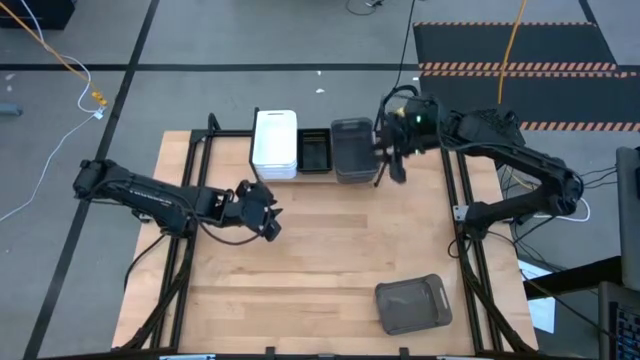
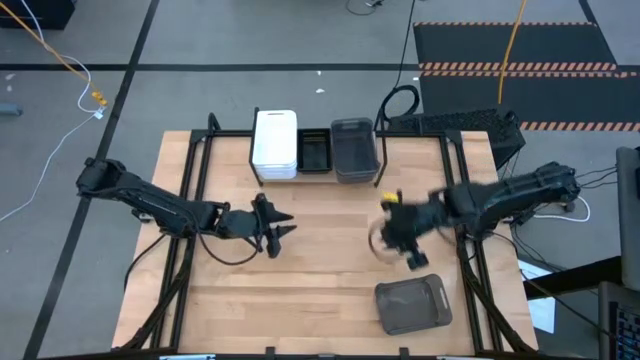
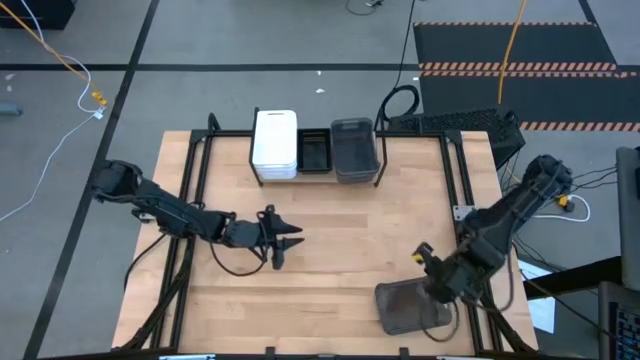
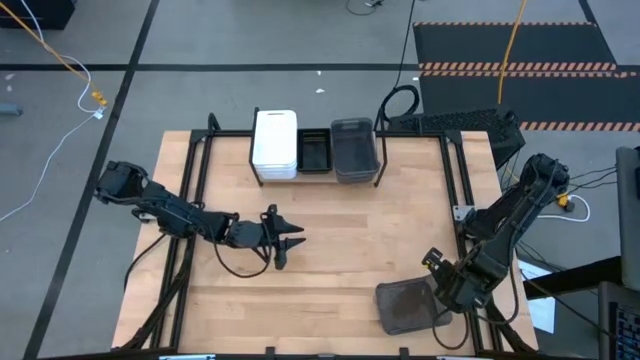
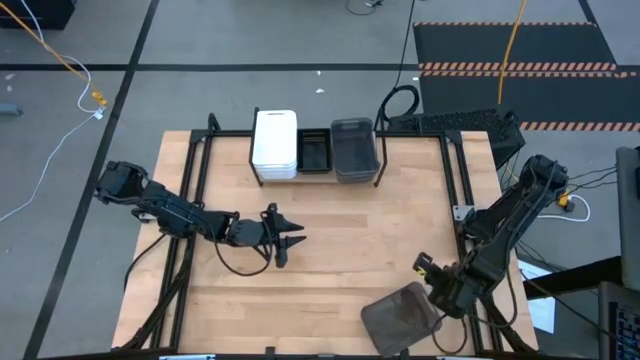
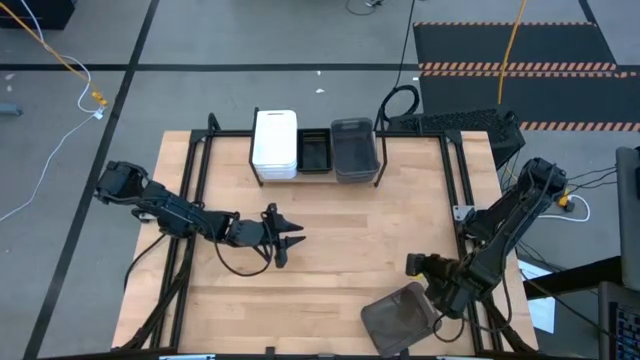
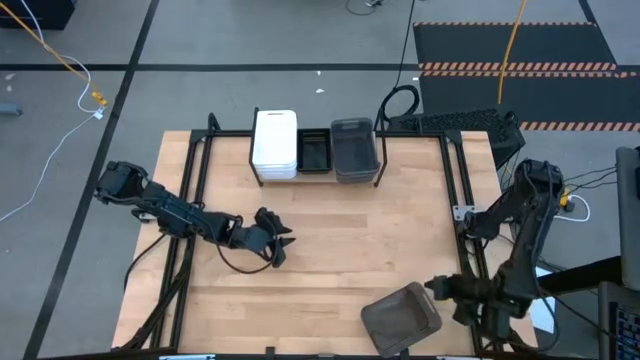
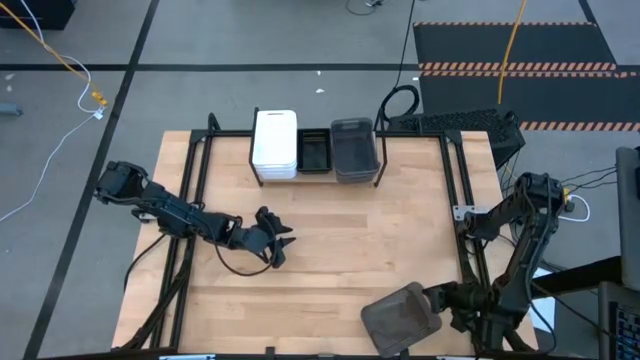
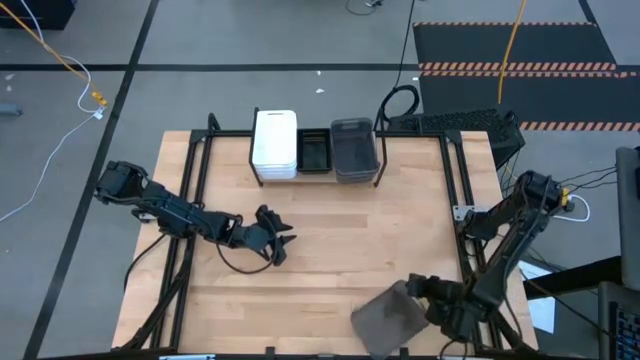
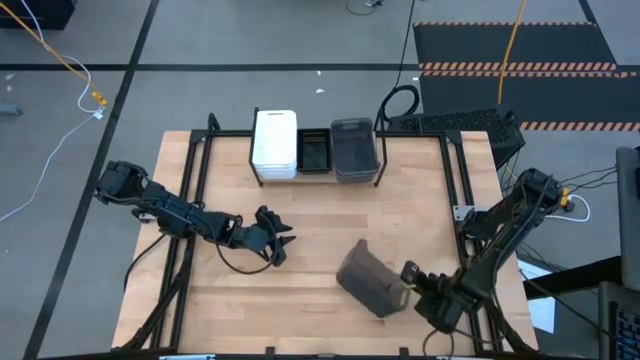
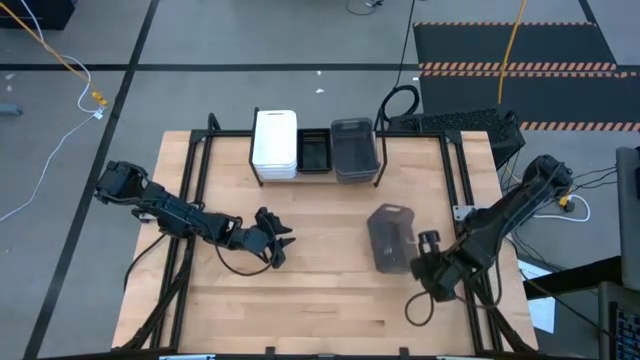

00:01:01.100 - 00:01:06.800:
Task: Stack baskets on shelf by color
Stack the gray bin on top of the other gray bin on the shelf

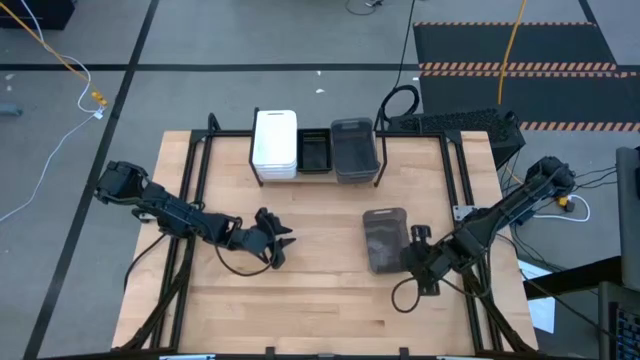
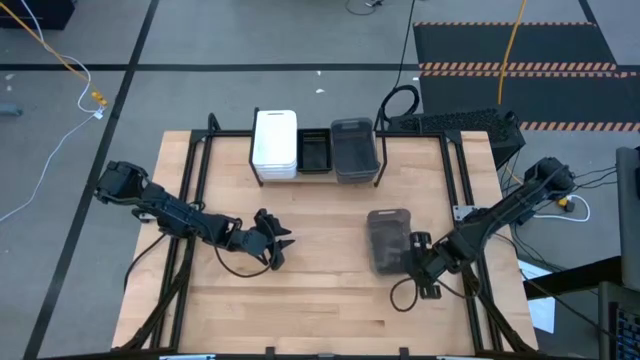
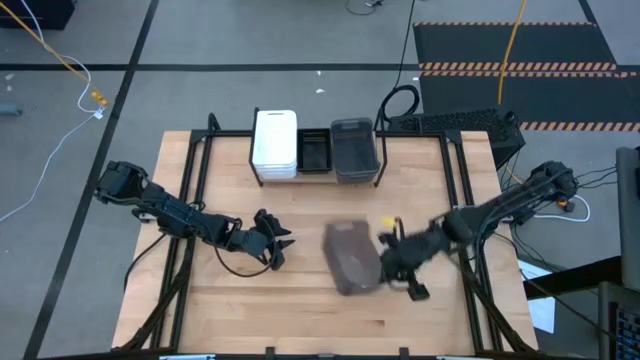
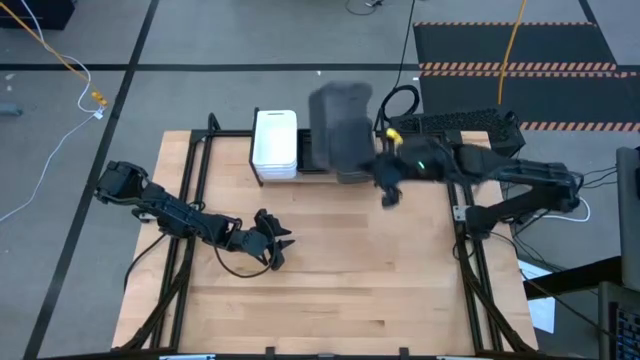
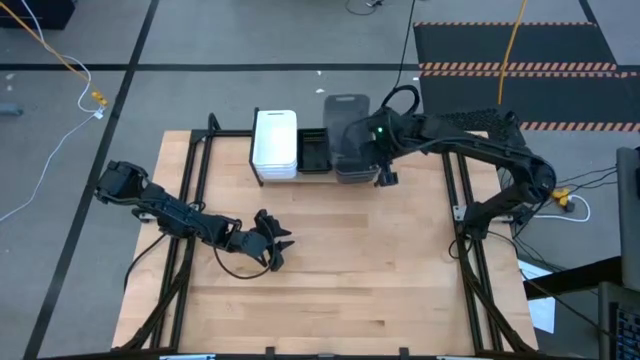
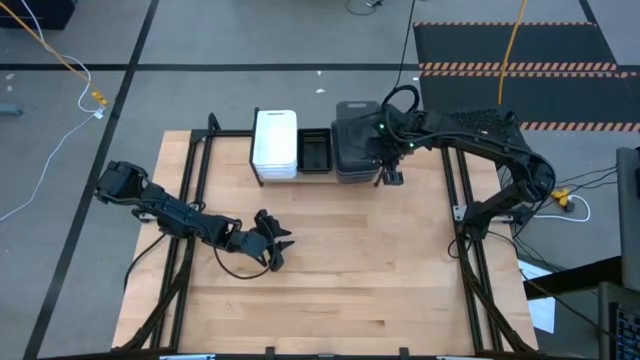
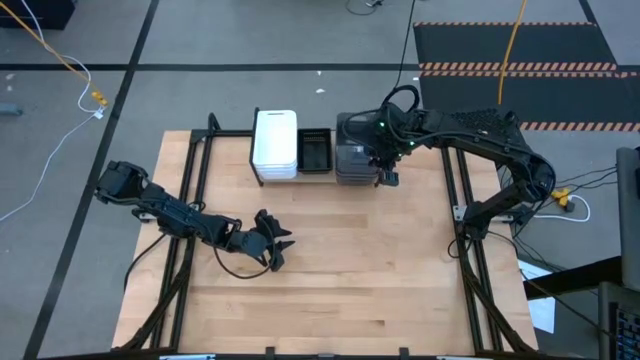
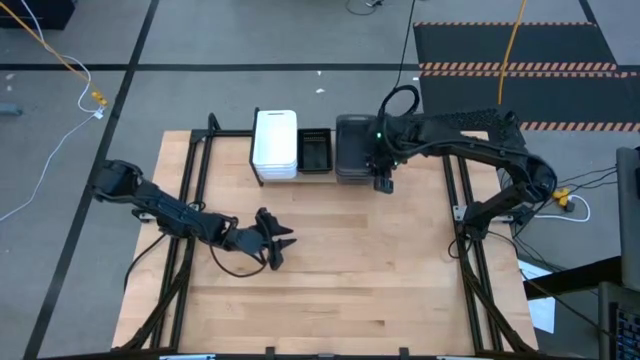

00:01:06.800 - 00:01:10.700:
Stack the gray bin on top of the other gray bin on the shelf

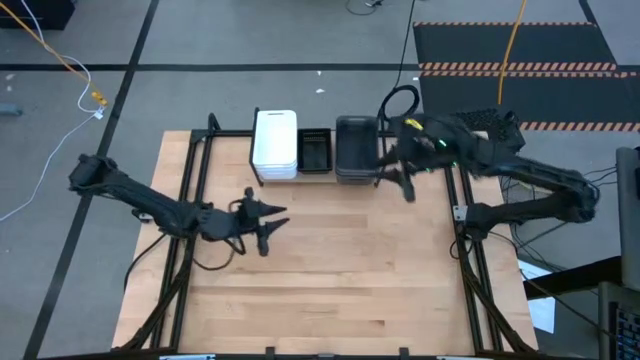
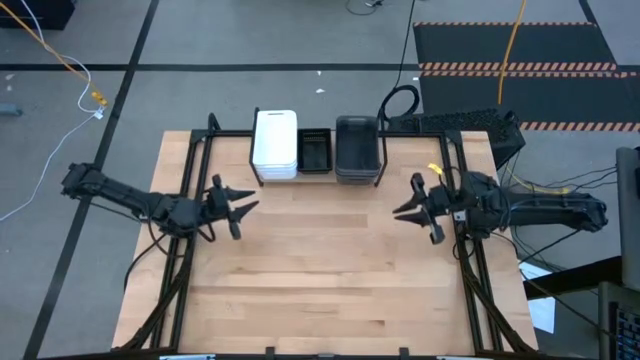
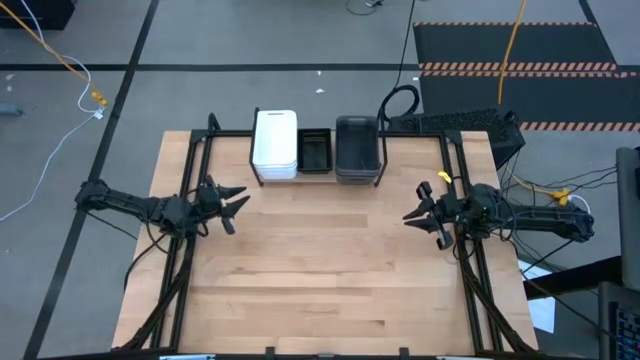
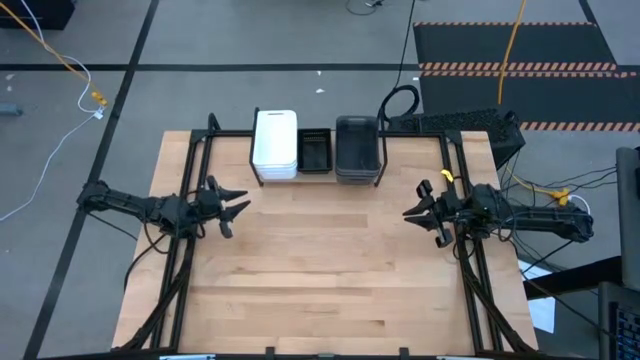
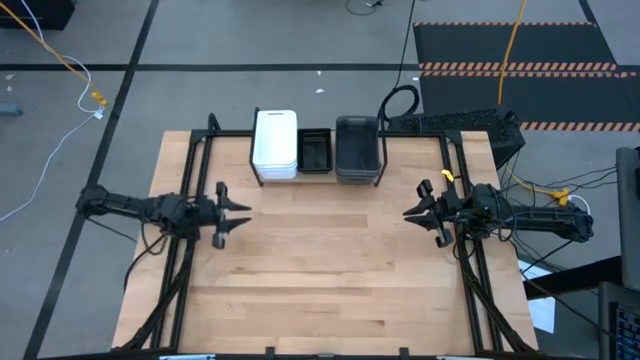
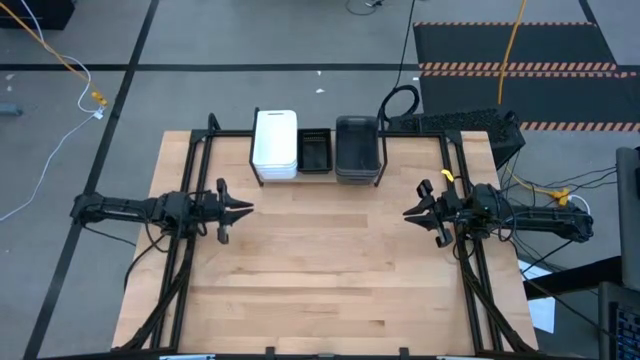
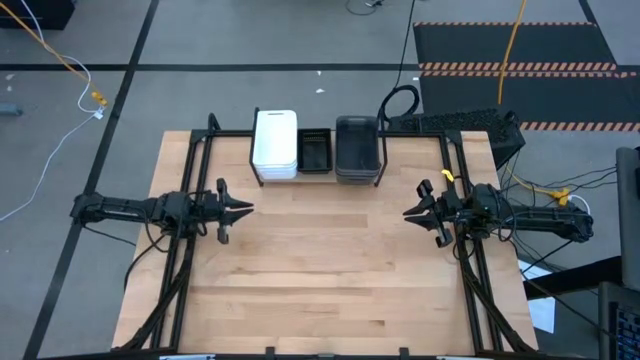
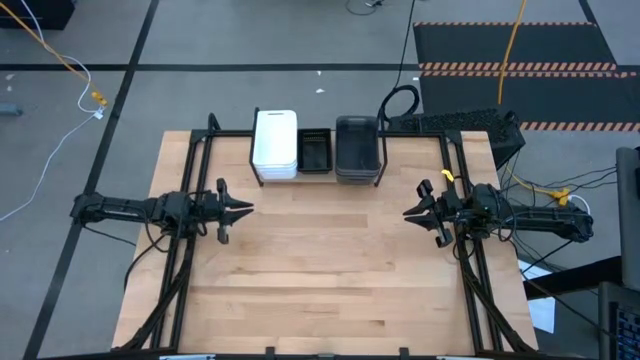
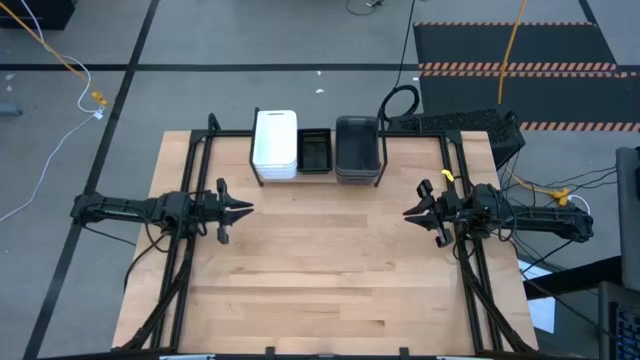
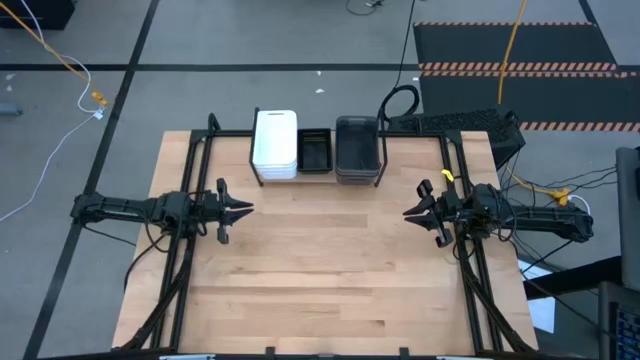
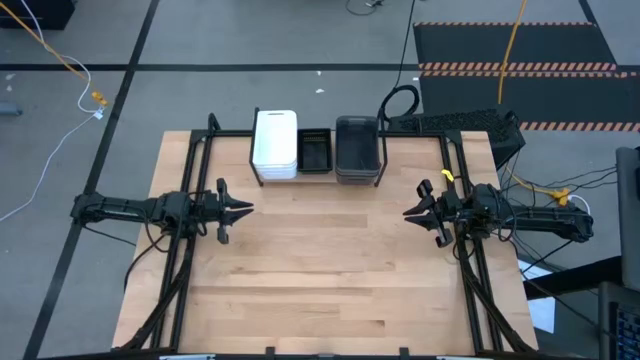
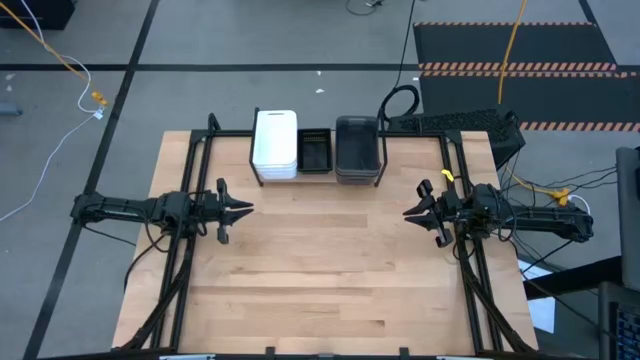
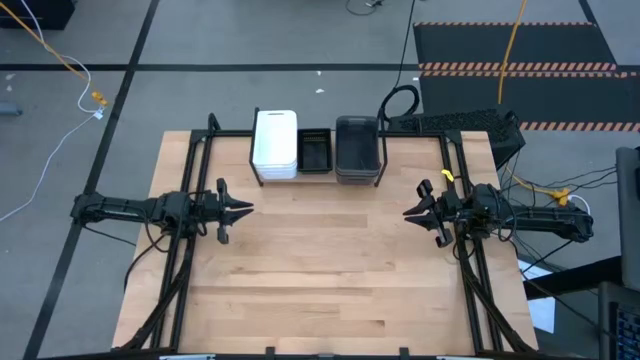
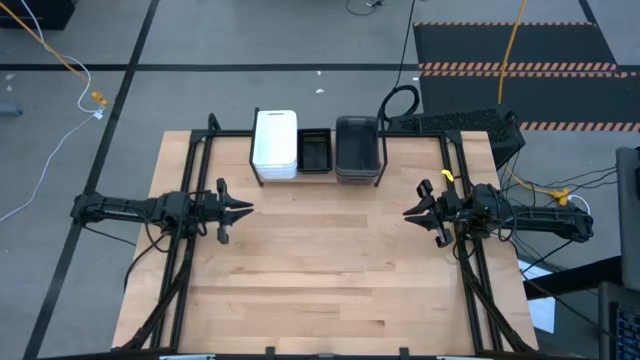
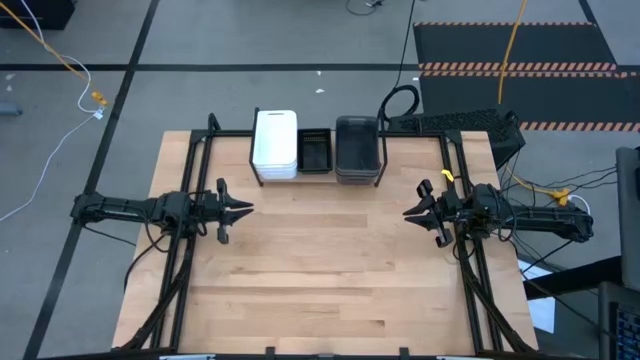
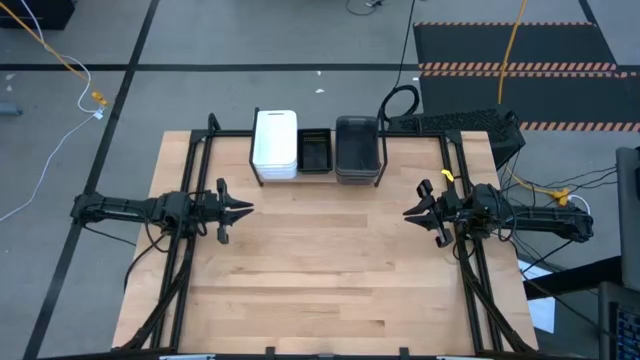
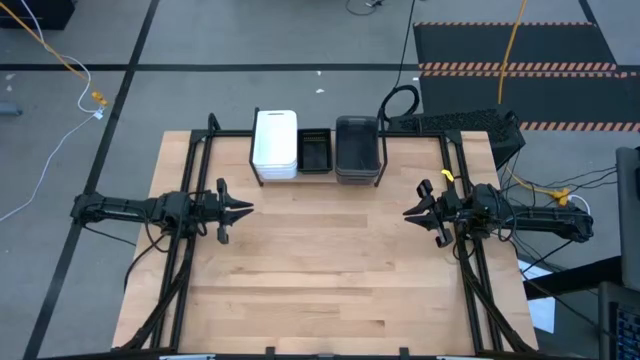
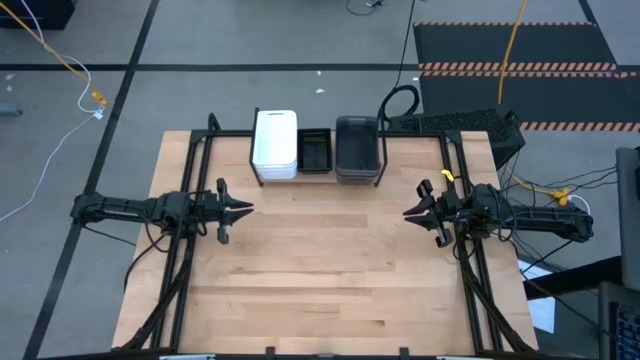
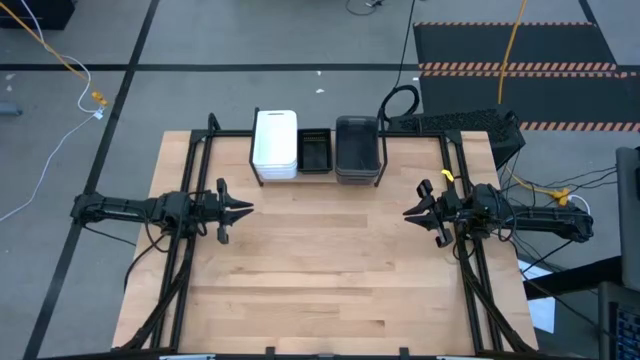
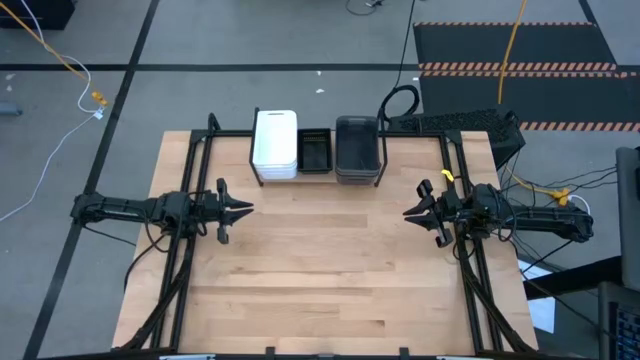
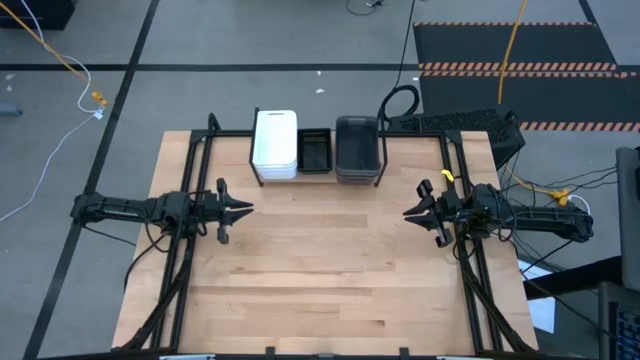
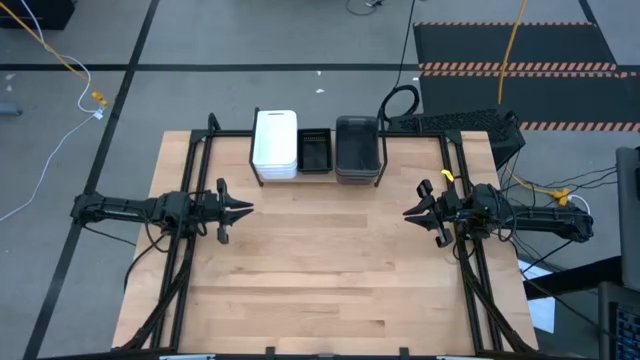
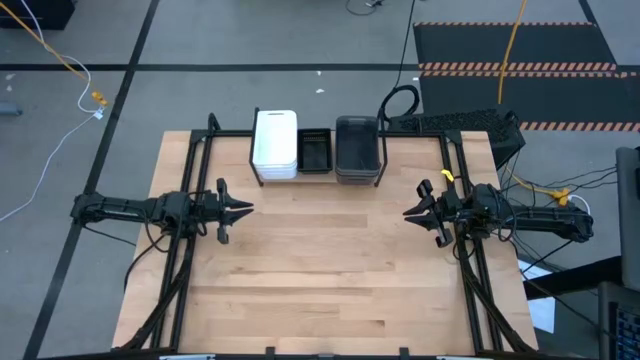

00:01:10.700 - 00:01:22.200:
Return to Home Position
